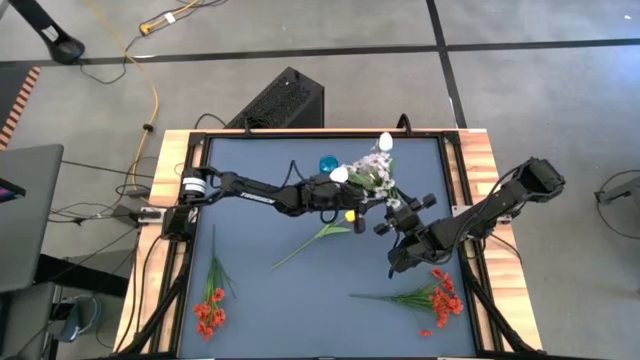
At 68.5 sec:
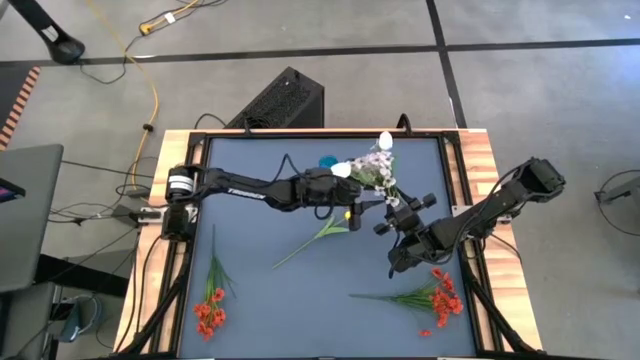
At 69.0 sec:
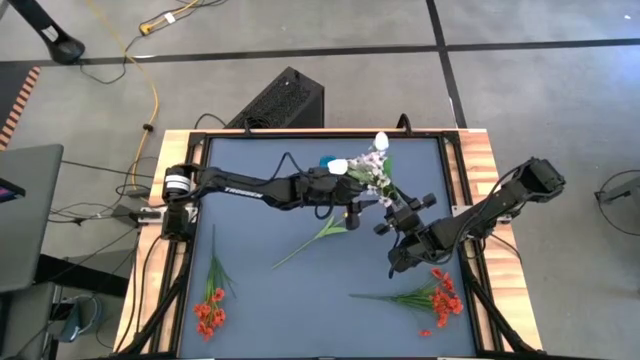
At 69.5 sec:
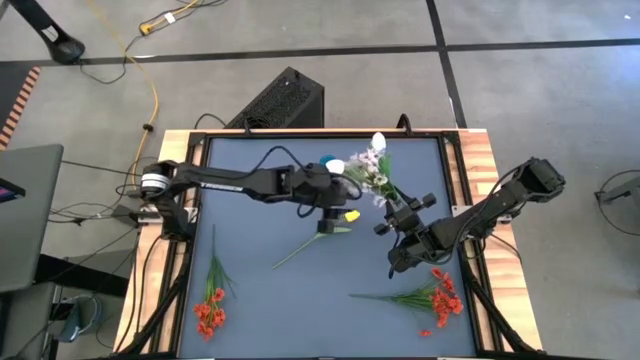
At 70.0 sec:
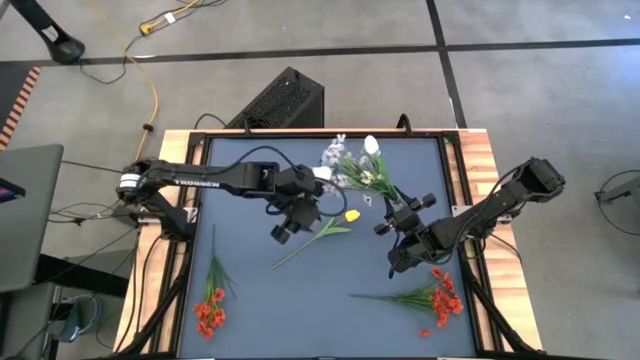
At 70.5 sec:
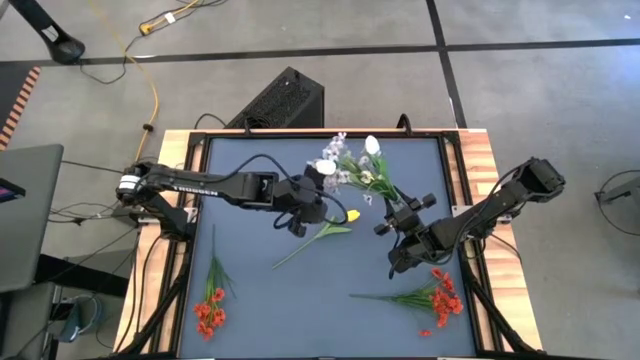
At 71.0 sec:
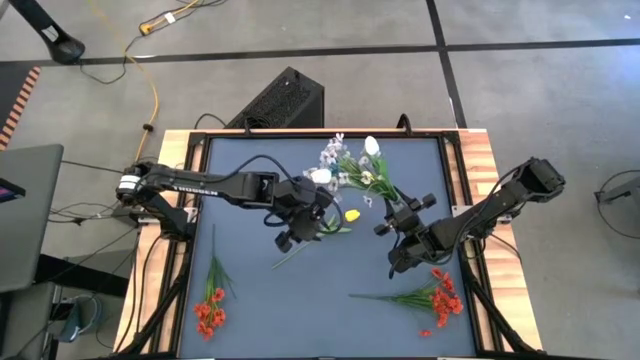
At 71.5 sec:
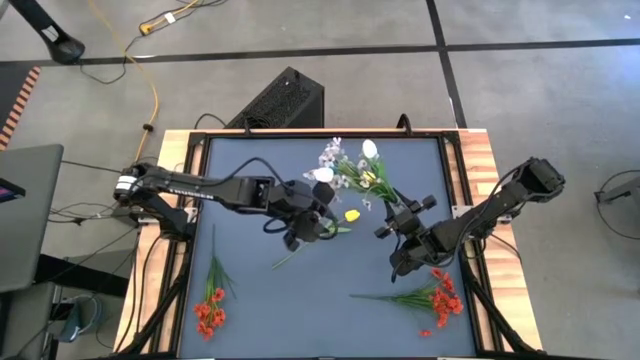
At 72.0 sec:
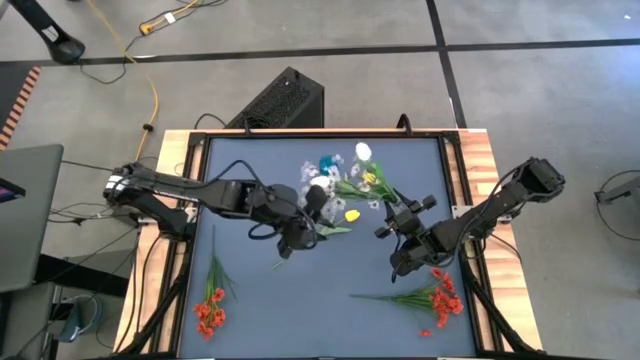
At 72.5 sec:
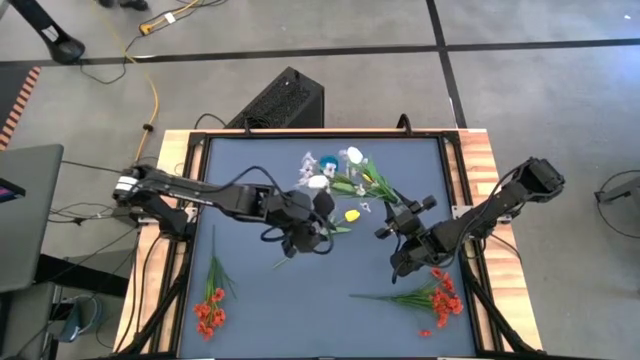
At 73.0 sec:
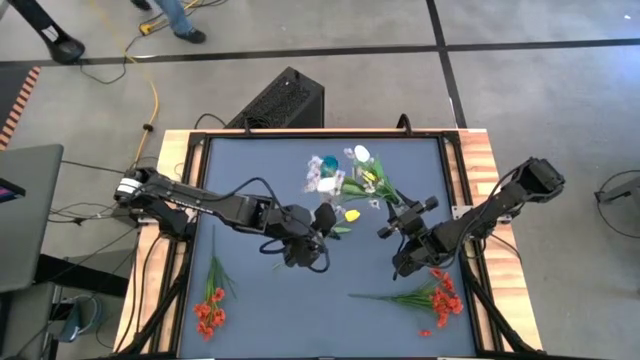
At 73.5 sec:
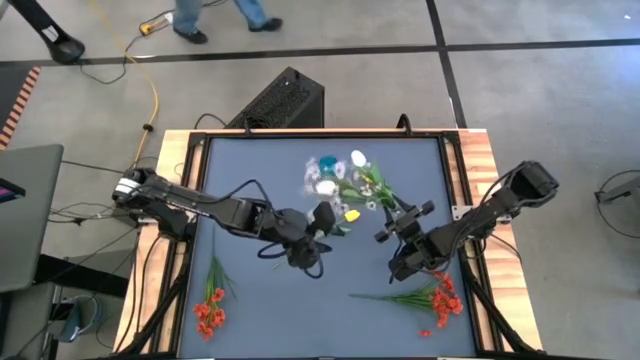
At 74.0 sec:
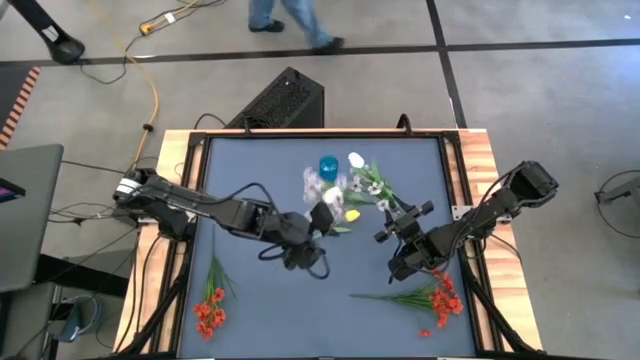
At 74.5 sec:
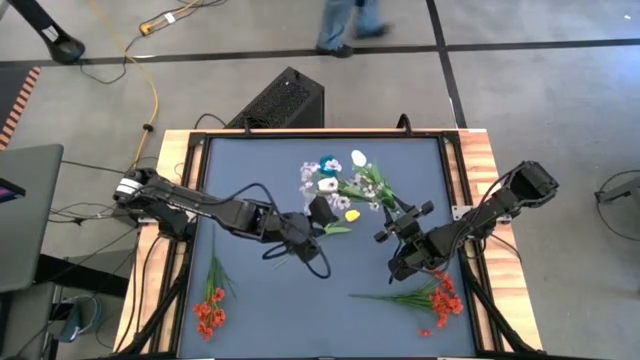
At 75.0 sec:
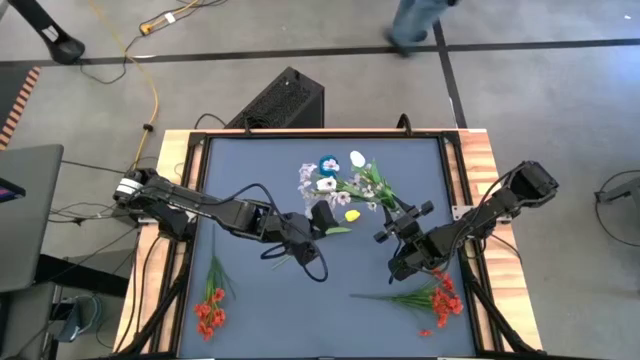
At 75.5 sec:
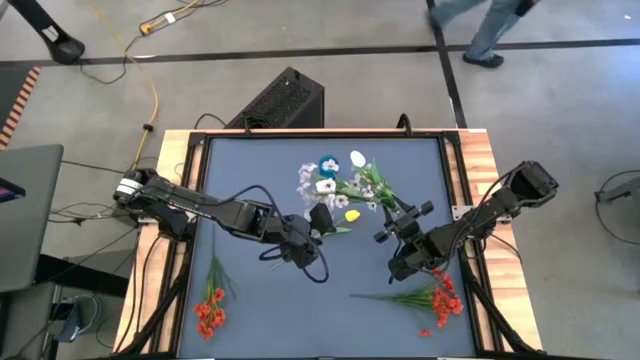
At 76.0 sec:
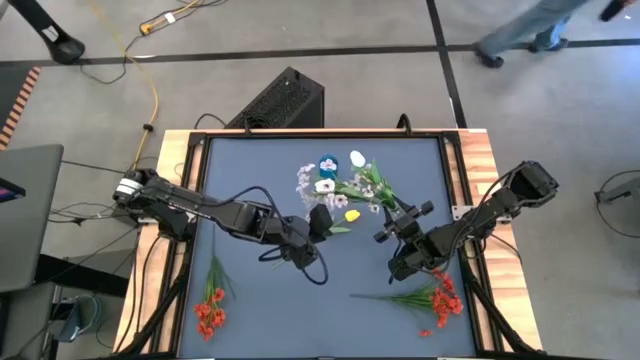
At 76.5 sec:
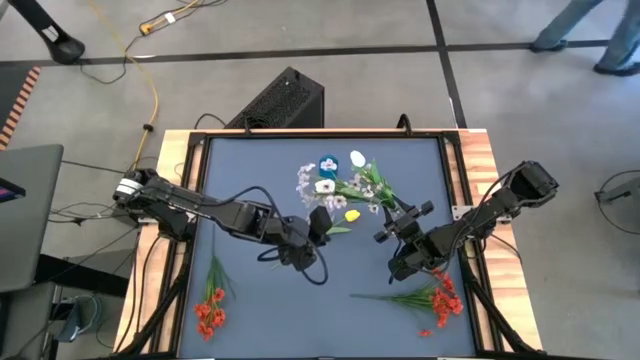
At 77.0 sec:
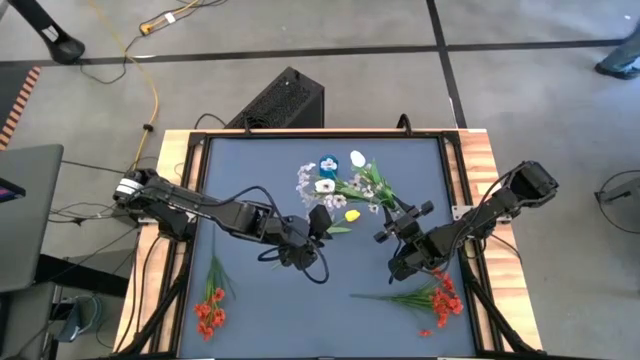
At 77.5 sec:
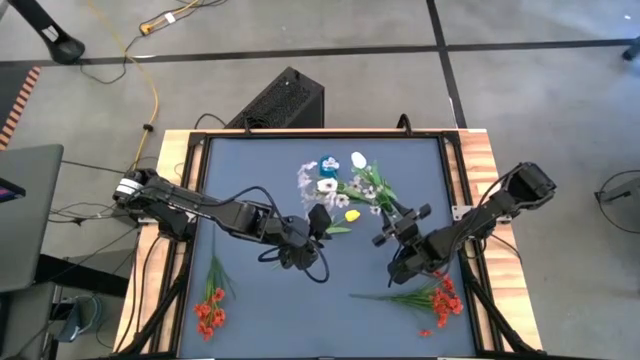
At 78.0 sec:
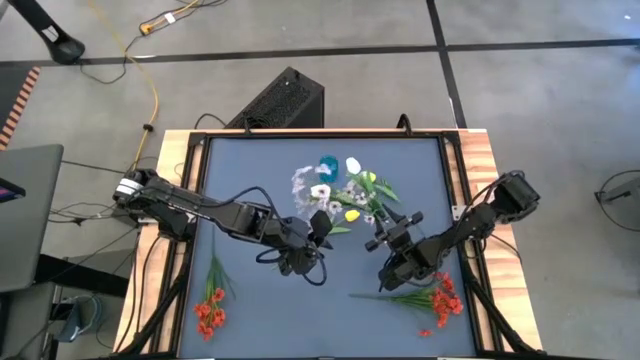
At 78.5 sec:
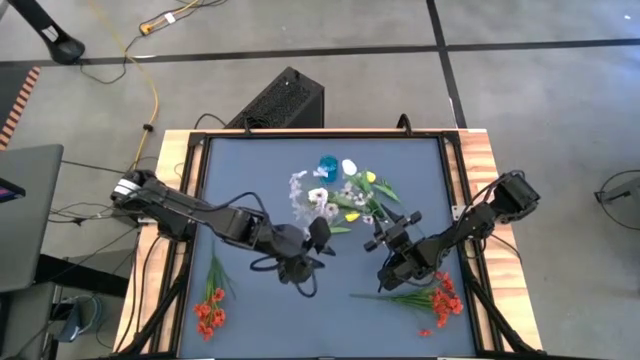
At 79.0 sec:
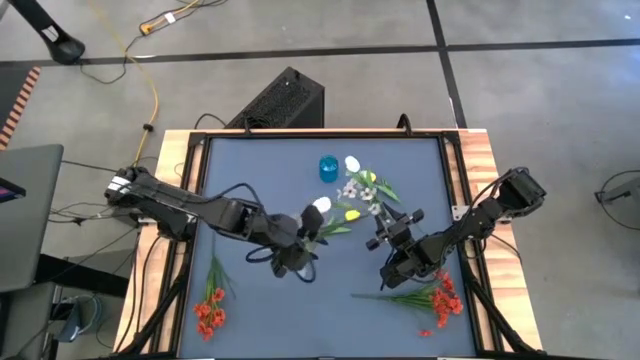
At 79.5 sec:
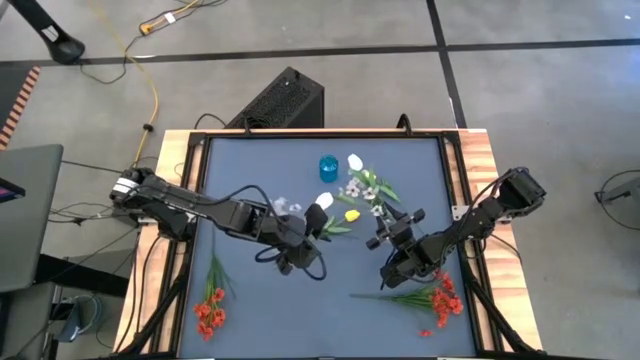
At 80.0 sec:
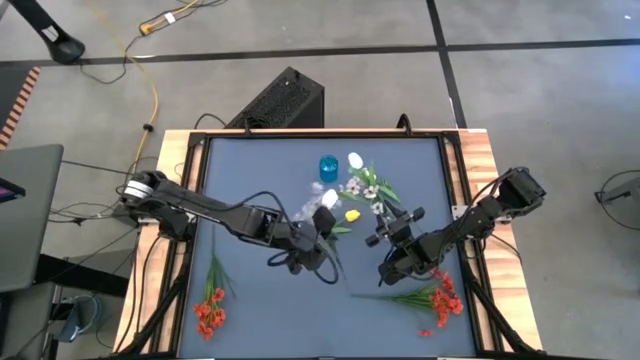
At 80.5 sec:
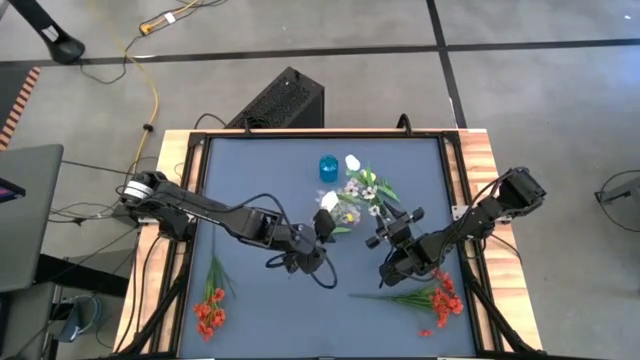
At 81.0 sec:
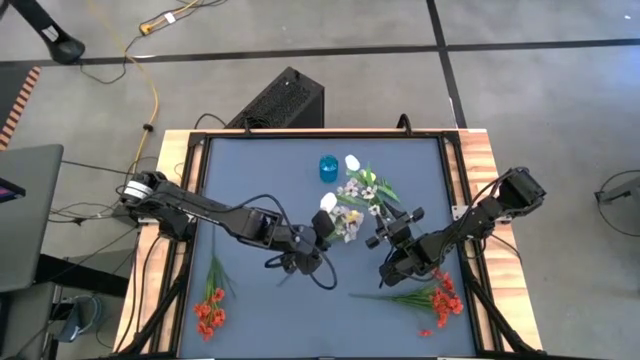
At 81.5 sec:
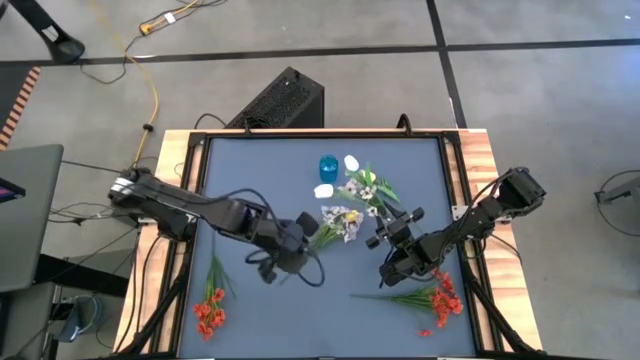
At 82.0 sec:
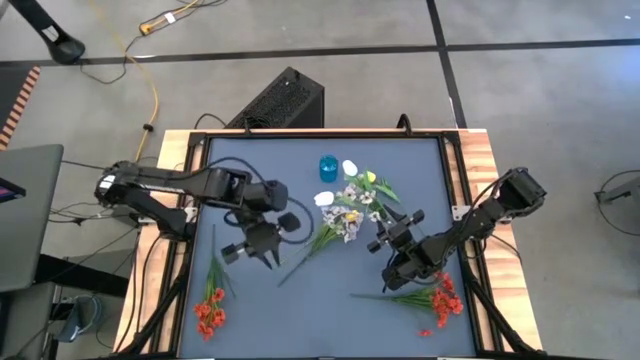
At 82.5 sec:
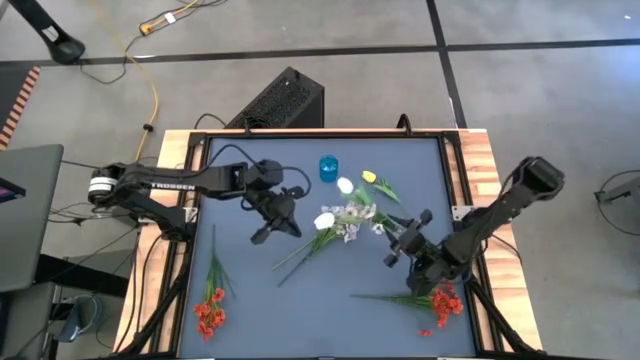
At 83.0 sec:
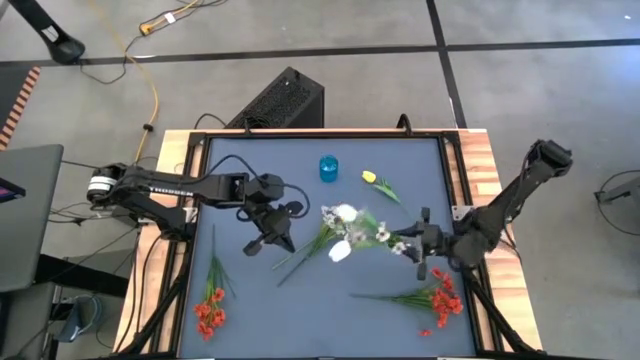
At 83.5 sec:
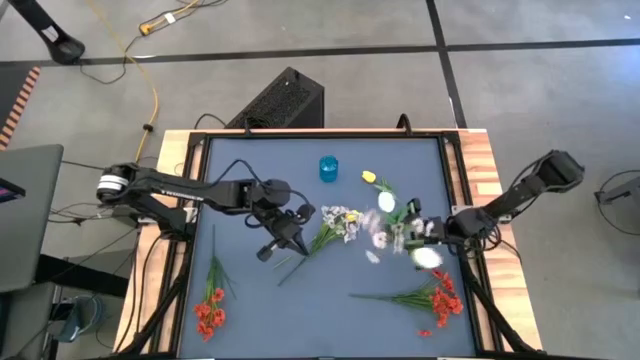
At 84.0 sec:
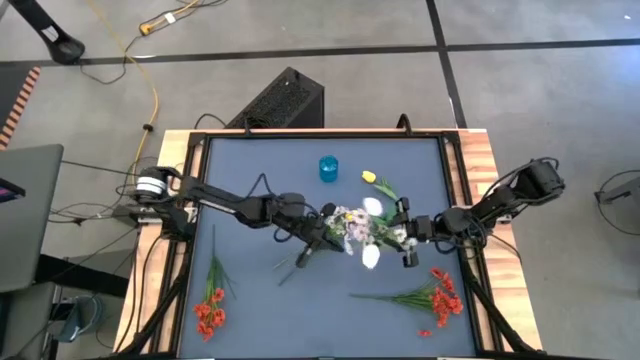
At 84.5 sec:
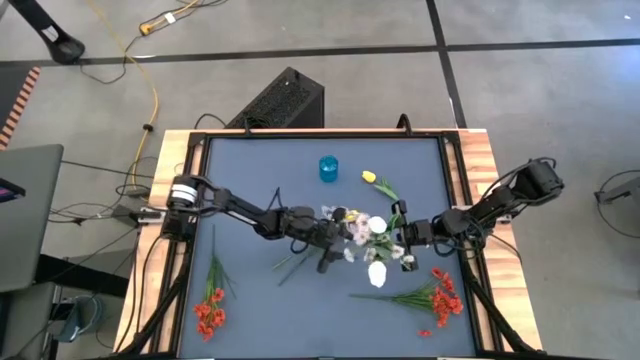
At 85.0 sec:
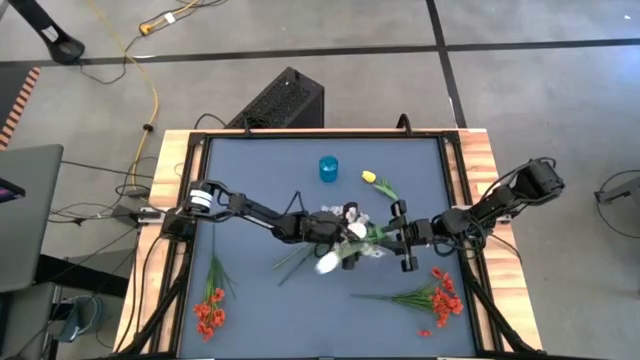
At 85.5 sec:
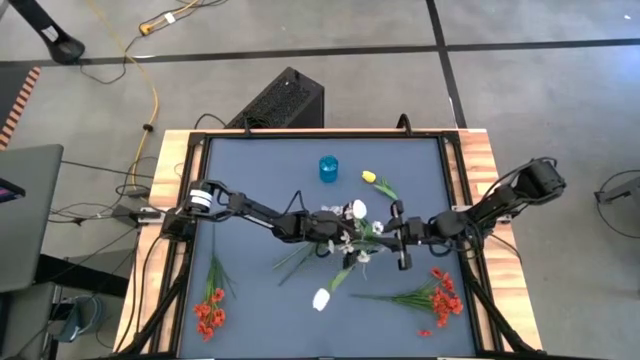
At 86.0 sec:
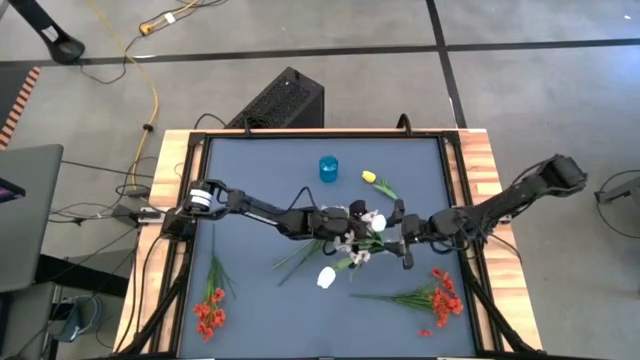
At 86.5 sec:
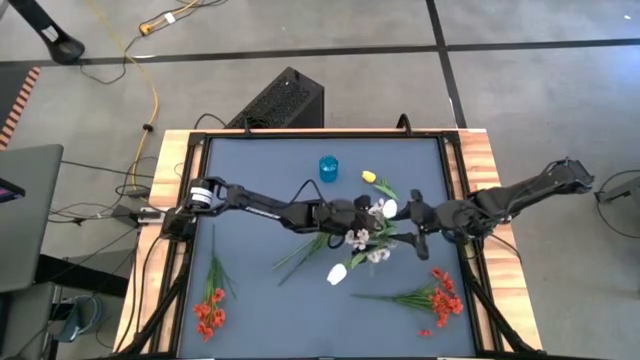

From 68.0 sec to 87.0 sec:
Task: Sort flowers into vase by color
Put the white flowers into the transparent vase
